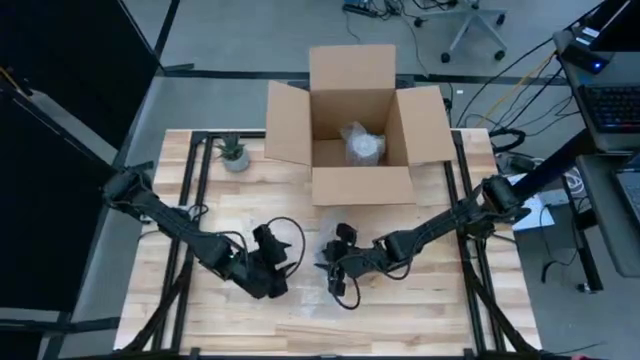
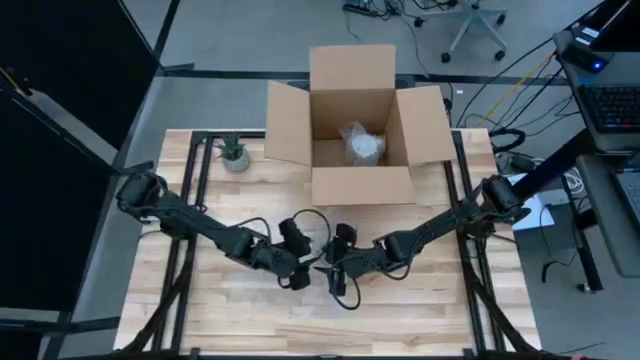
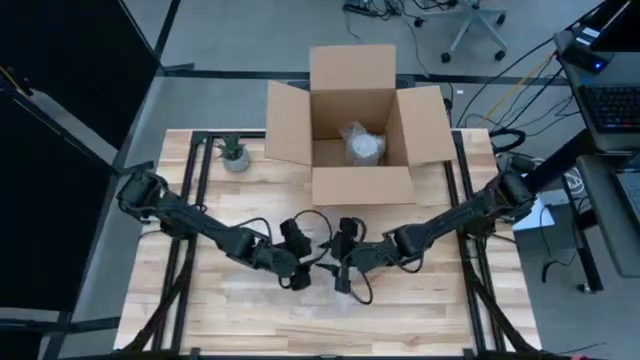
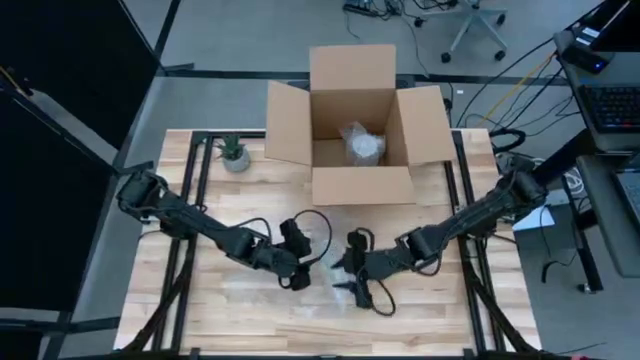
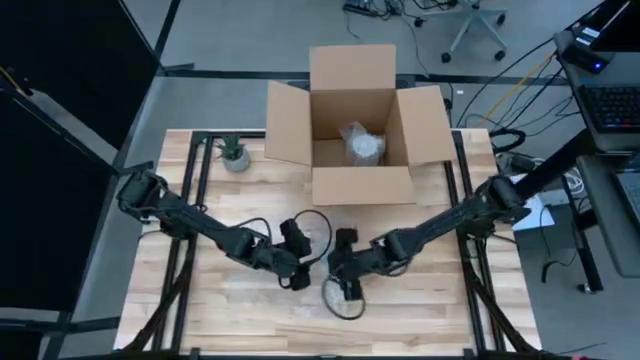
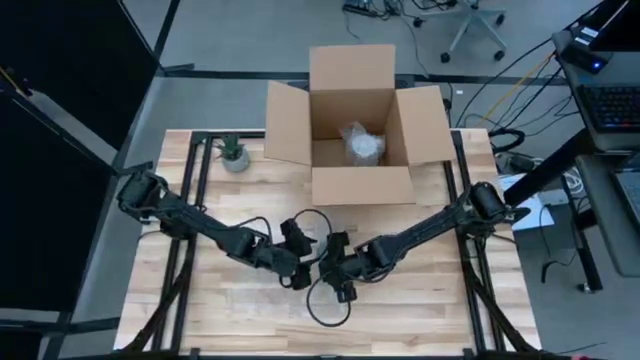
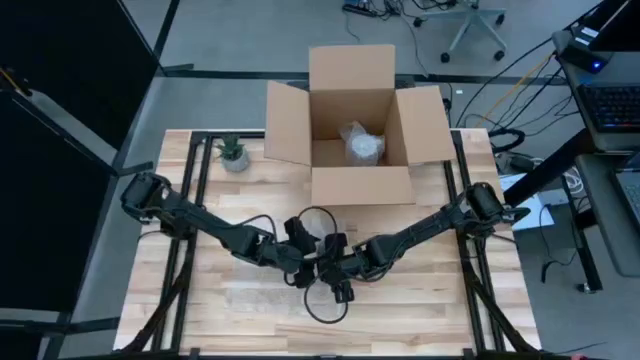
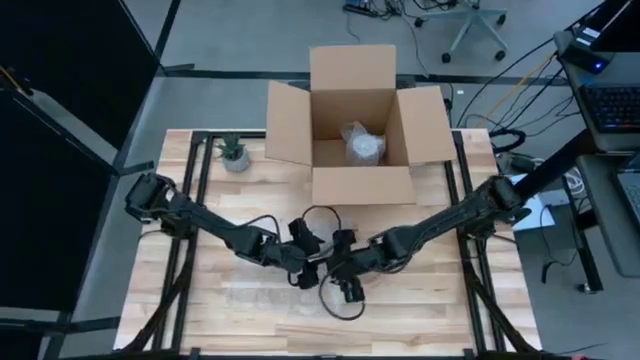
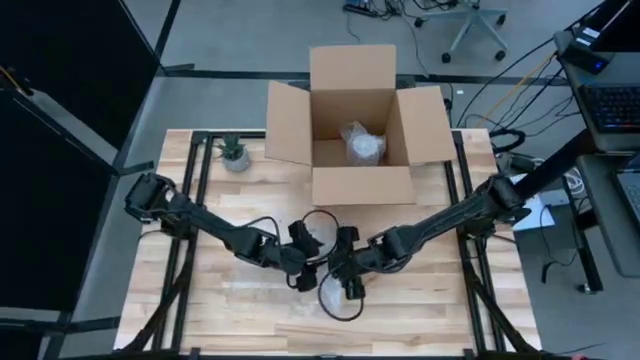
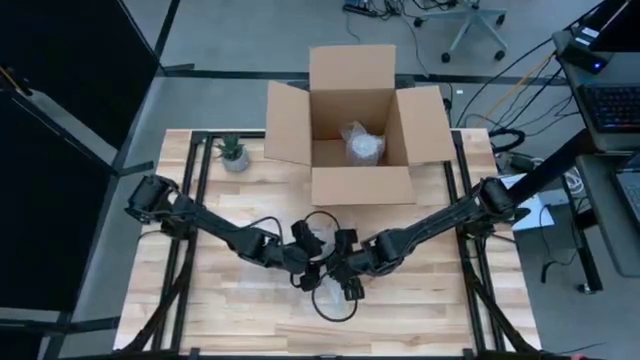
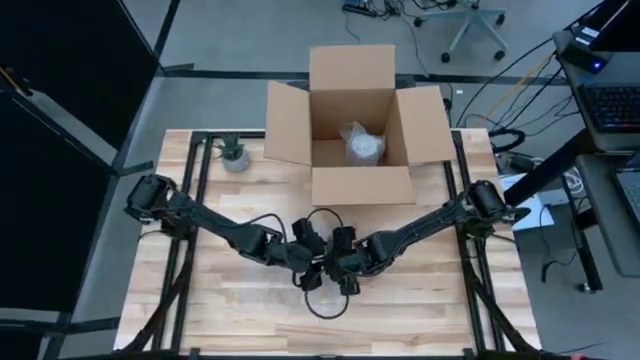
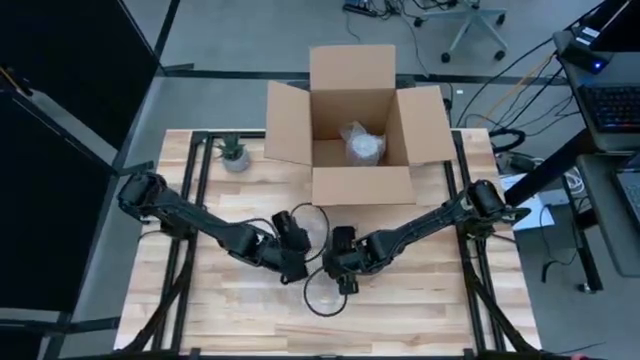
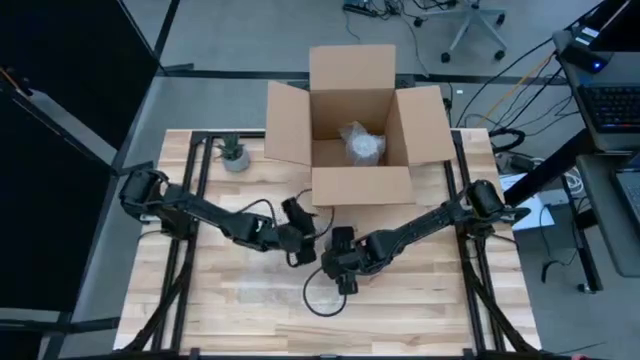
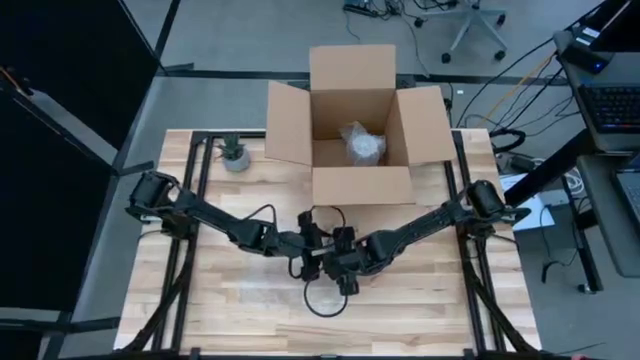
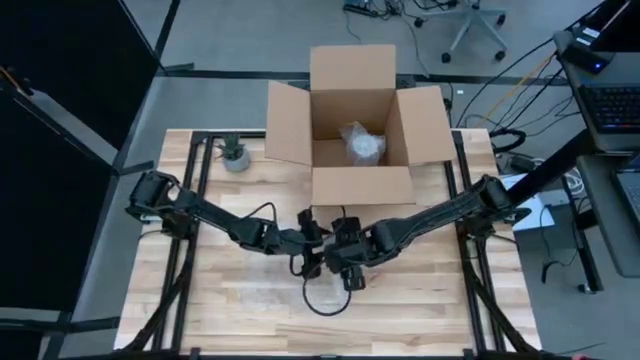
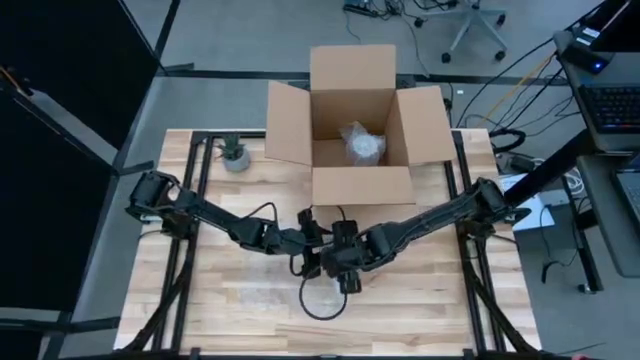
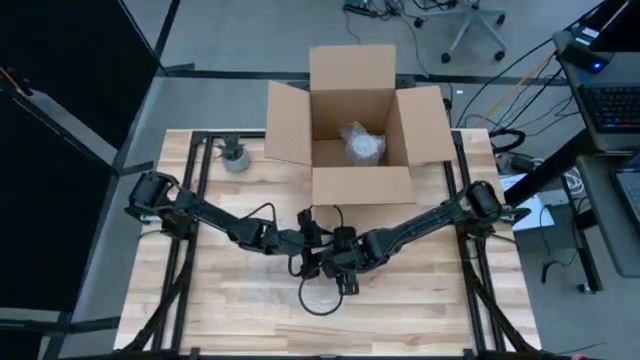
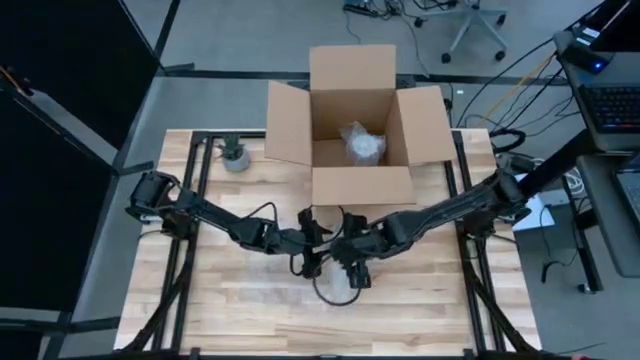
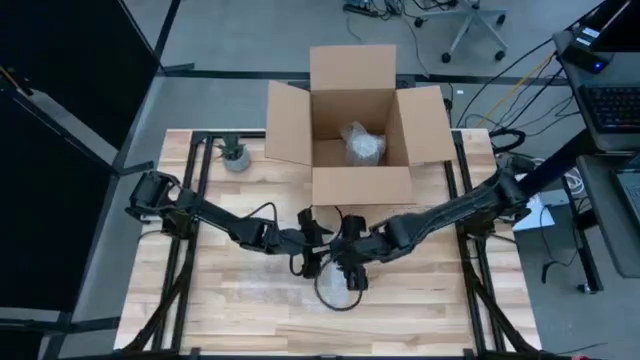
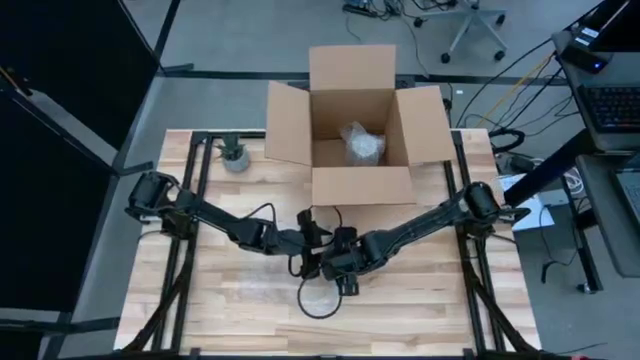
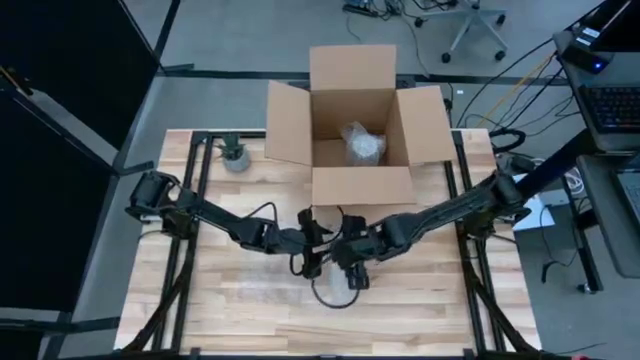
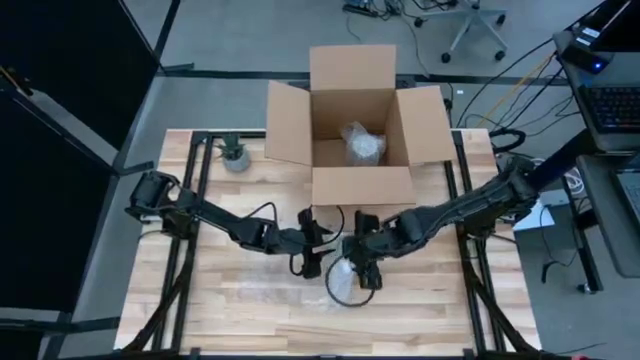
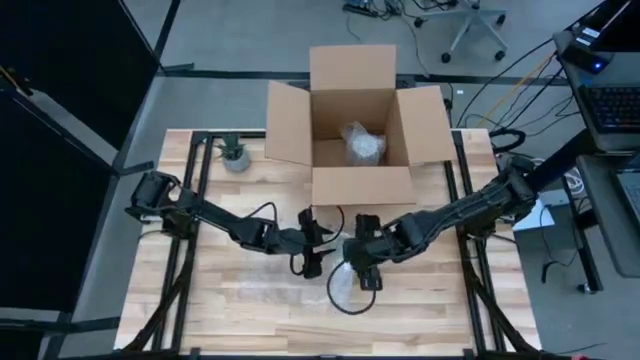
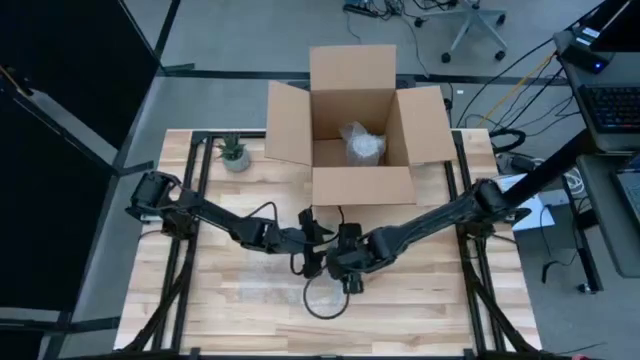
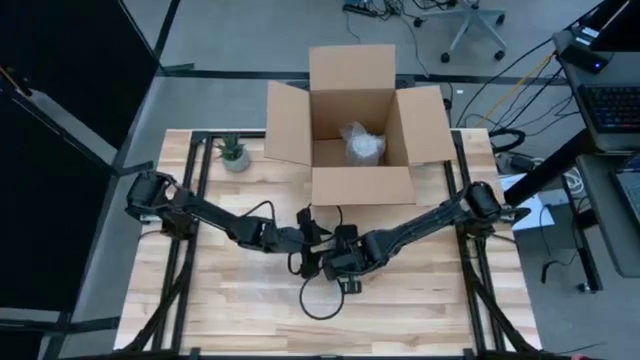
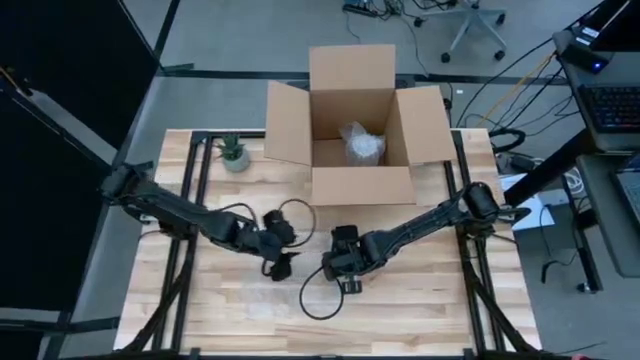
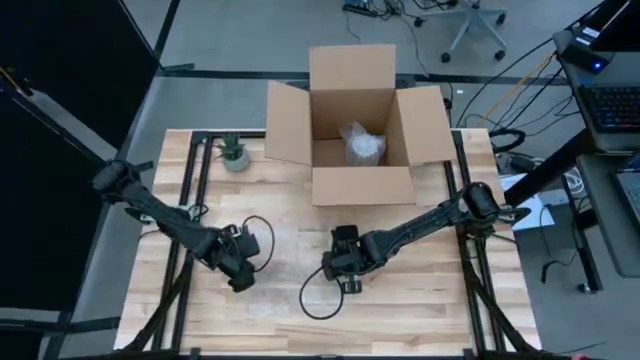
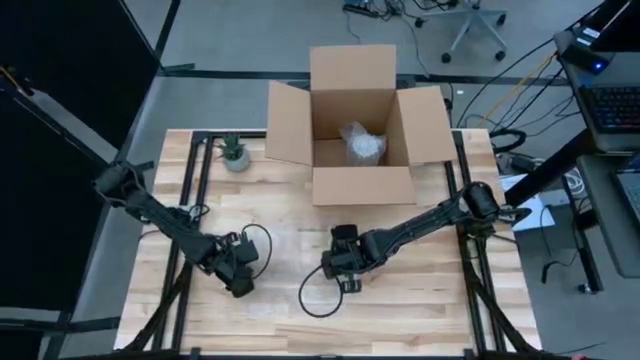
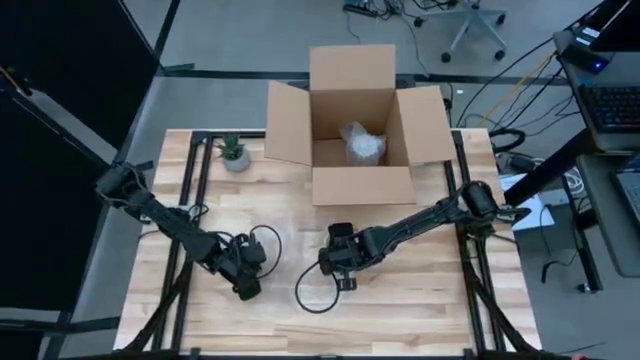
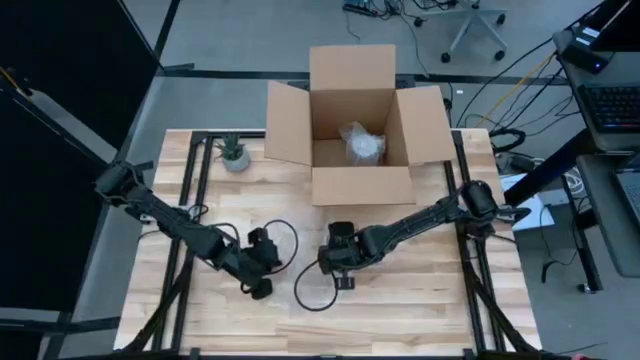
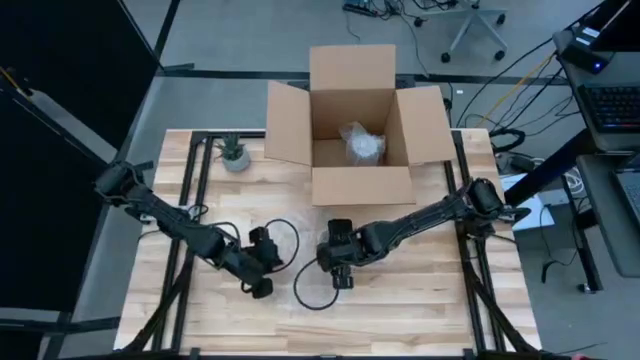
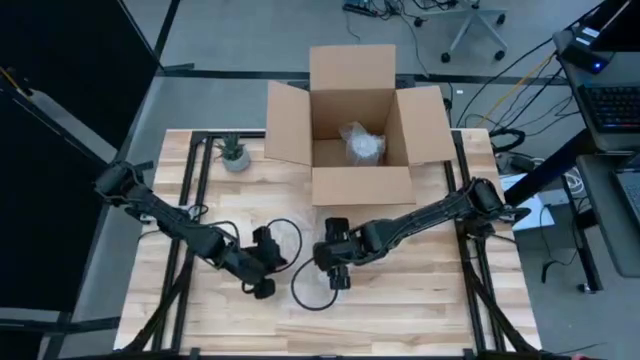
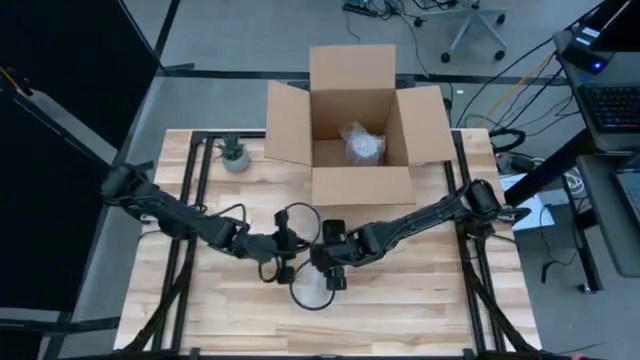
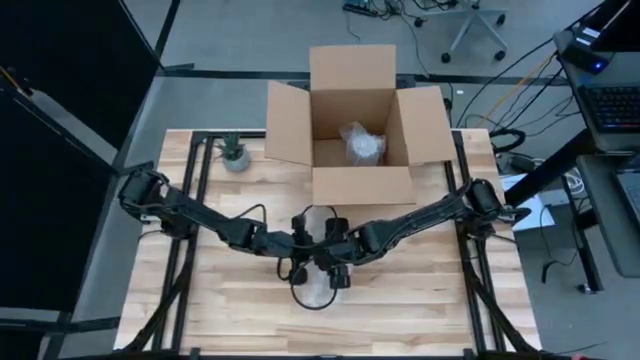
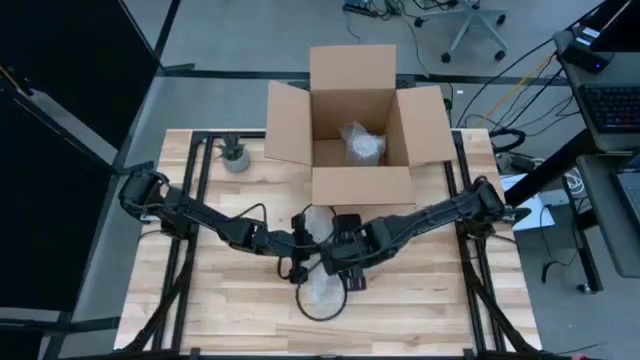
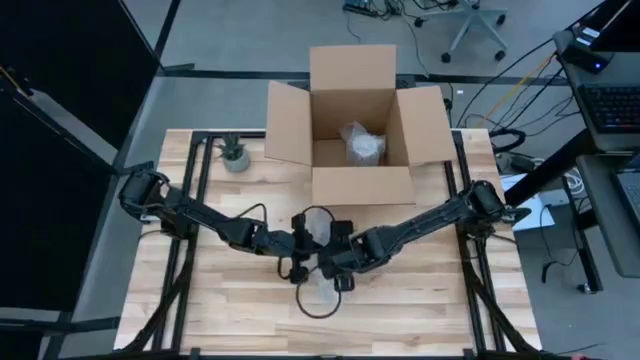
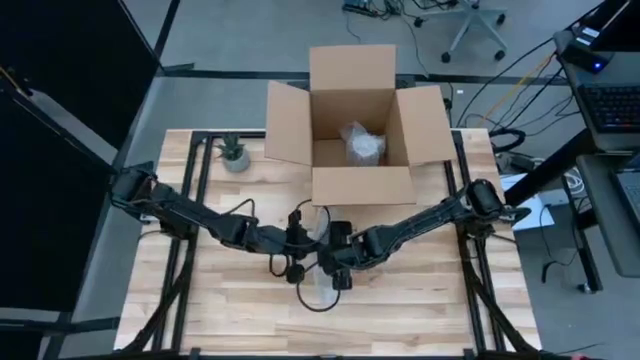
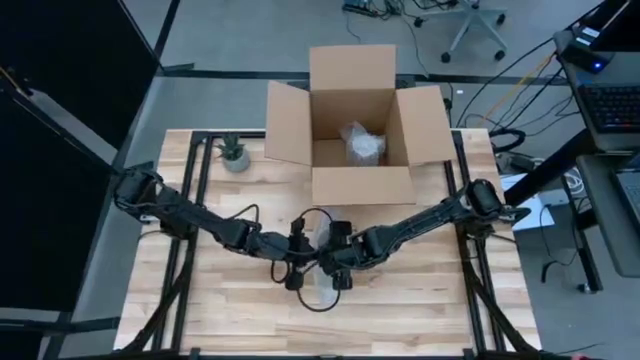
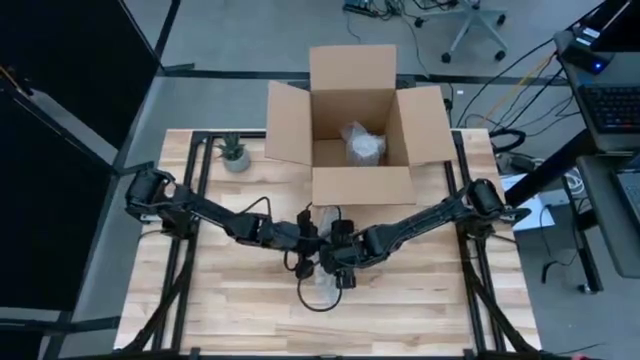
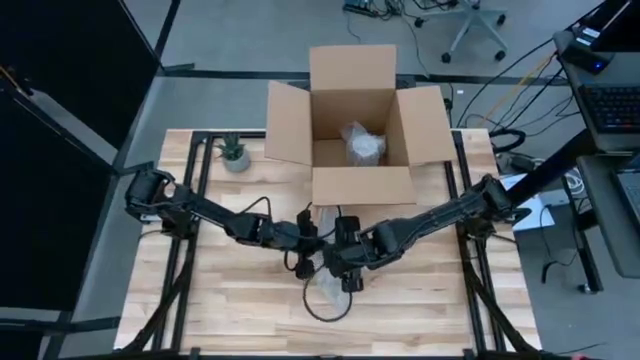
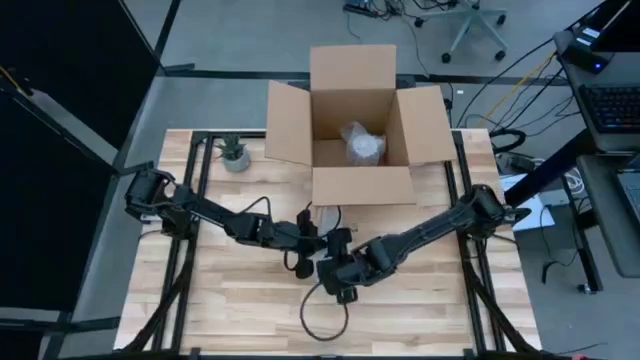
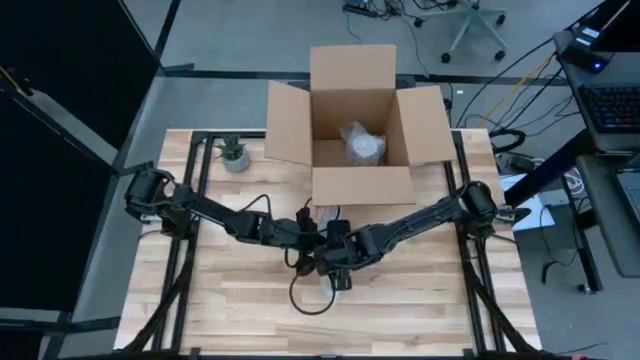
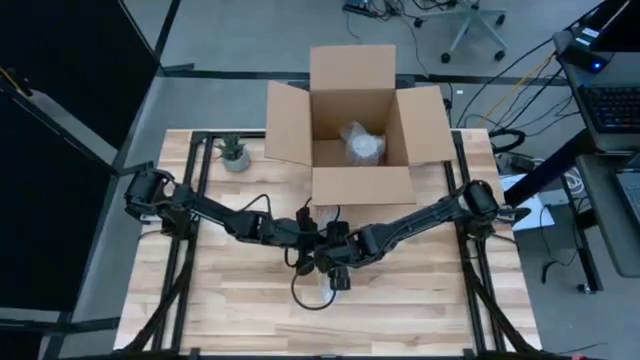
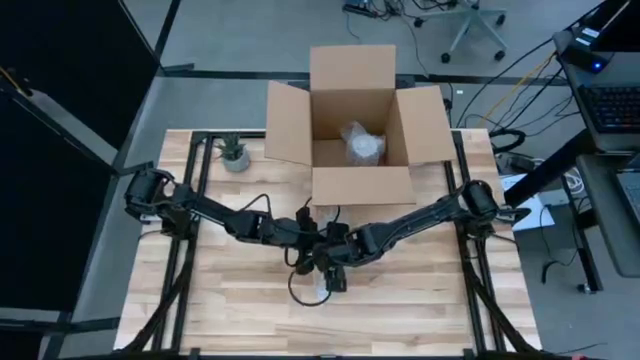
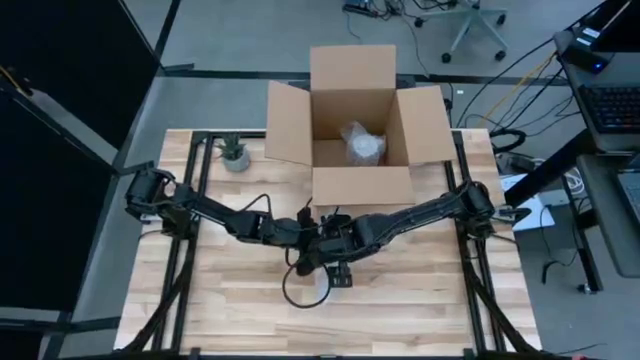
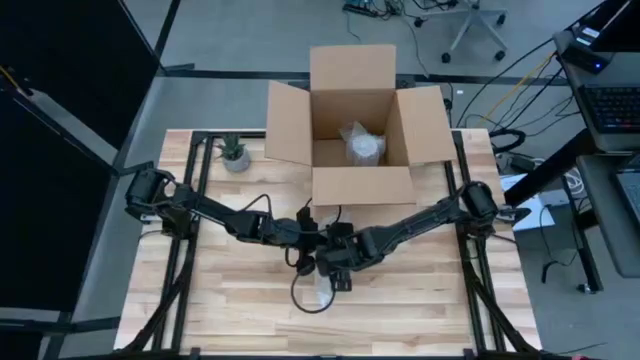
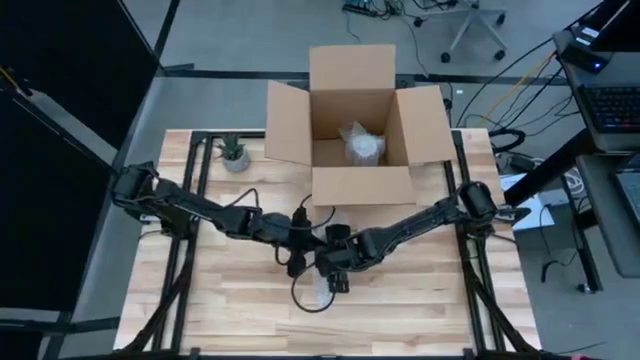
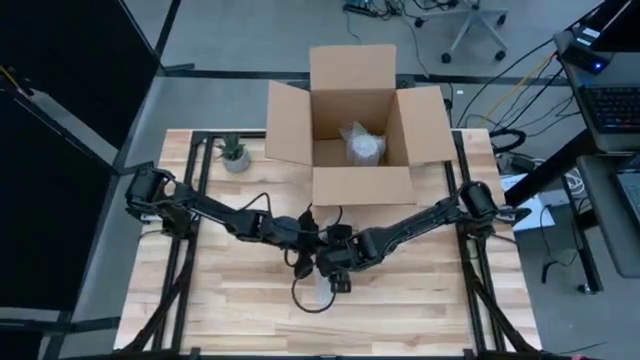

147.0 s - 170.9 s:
Task: wrap mug
Wrap the orange patterned mug with bubble wrap
